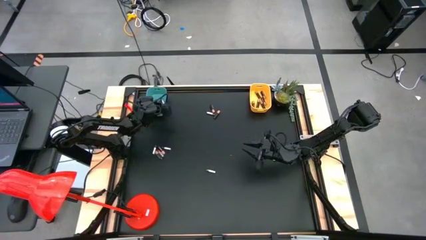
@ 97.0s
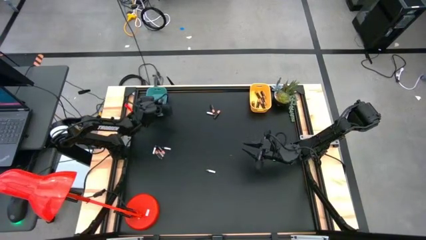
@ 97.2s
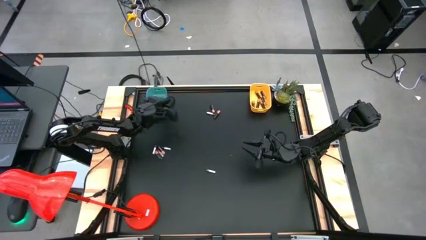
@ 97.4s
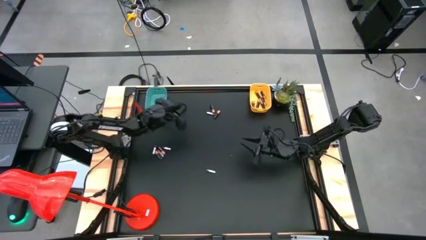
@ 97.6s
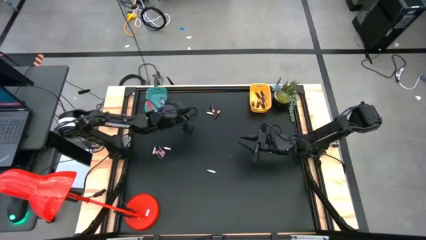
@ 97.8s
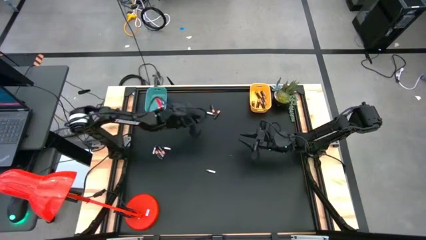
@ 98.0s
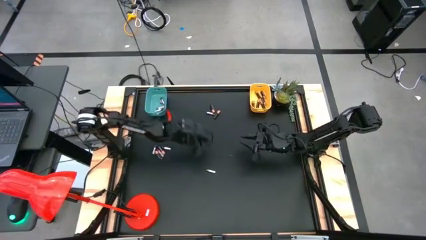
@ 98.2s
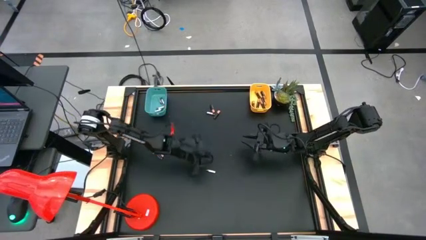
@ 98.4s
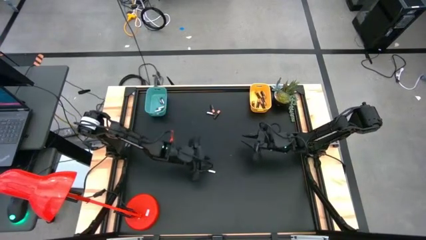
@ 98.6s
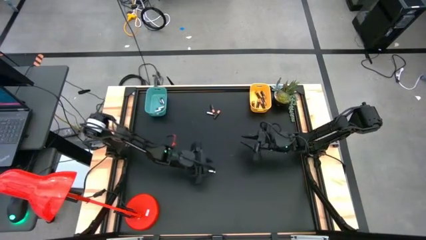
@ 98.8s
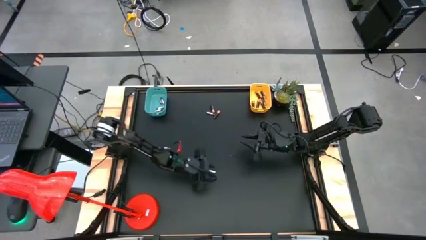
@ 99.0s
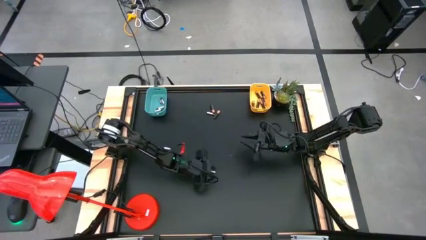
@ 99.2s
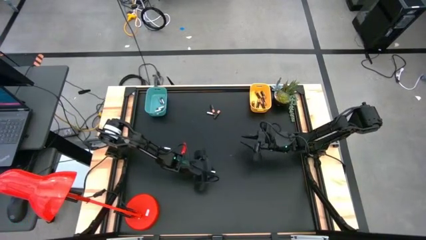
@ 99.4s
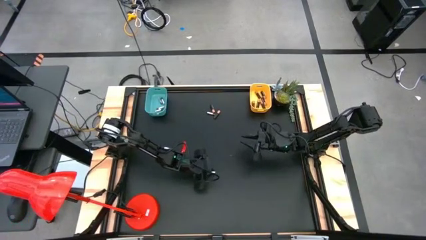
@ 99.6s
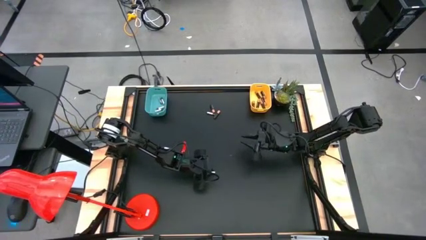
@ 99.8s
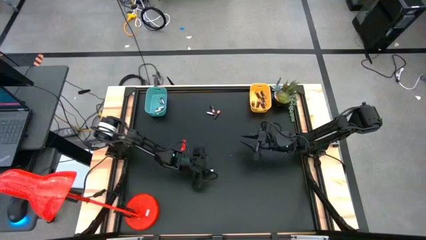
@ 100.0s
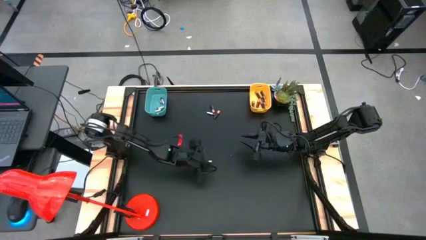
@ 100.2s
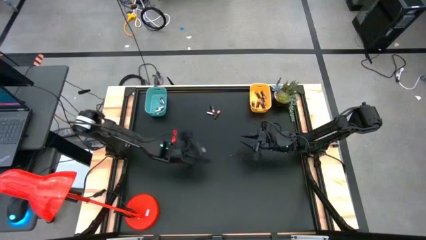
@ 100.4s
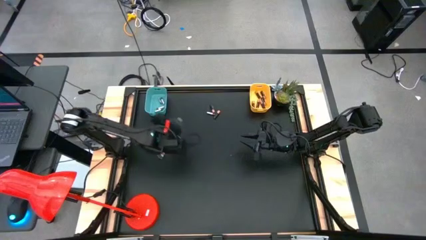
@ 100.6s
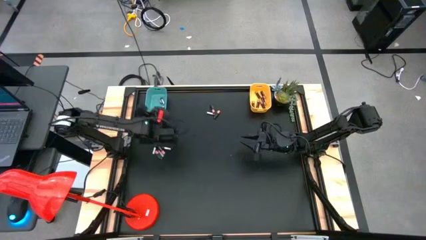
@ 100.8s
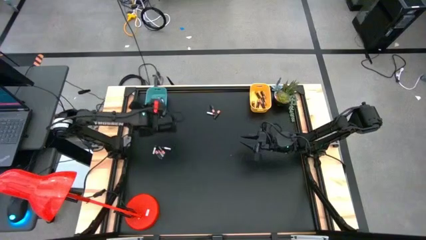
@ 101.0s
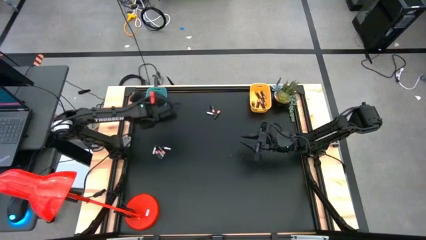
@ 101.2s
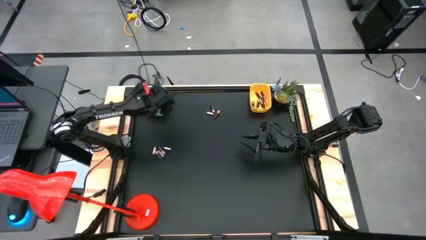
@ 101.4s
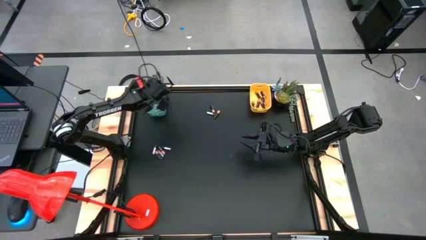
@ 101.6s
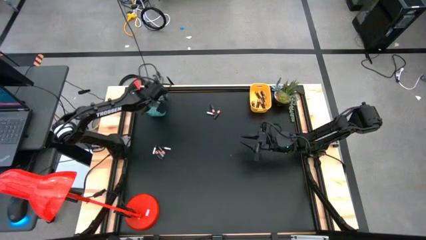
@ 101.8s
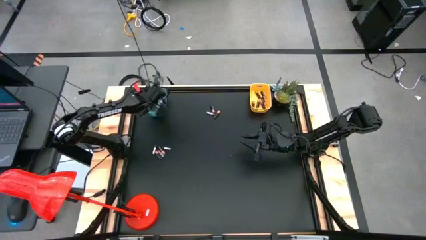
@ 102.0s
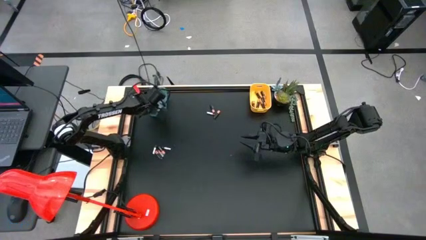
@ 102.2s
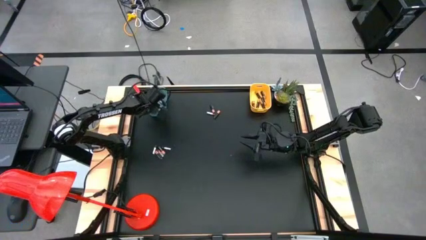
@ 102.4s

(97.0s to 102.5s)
Task: Sort batteries
Put the silver battery into the blue bin

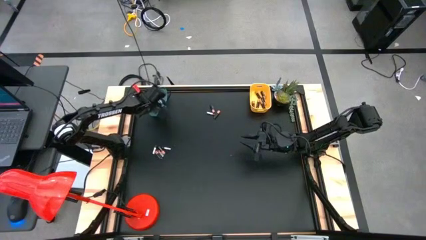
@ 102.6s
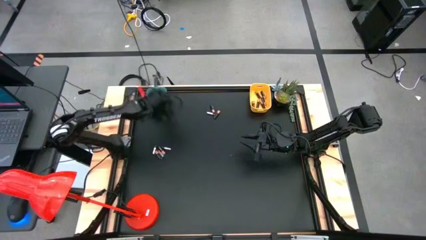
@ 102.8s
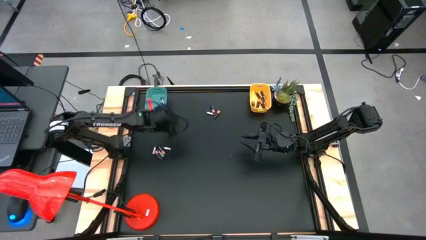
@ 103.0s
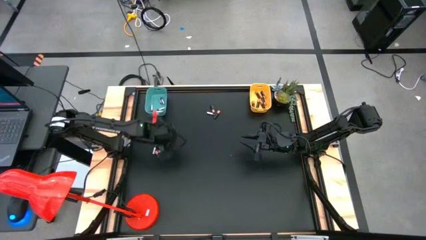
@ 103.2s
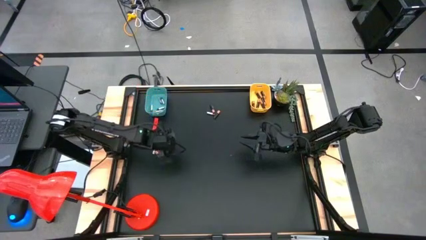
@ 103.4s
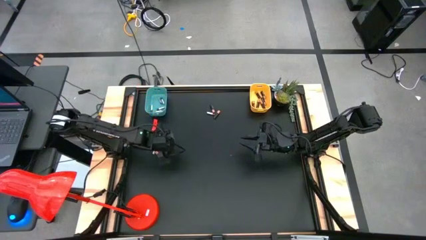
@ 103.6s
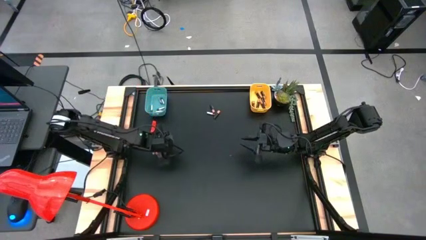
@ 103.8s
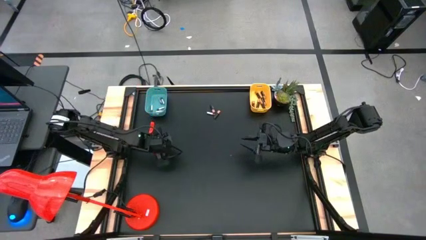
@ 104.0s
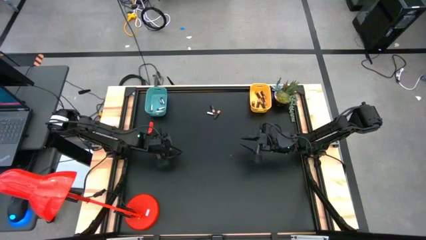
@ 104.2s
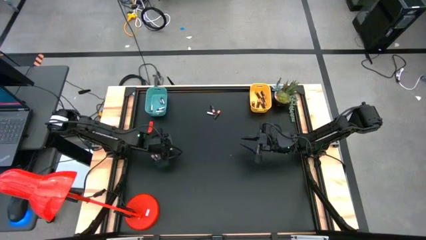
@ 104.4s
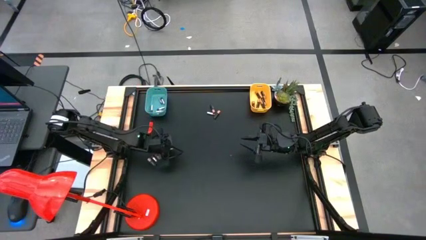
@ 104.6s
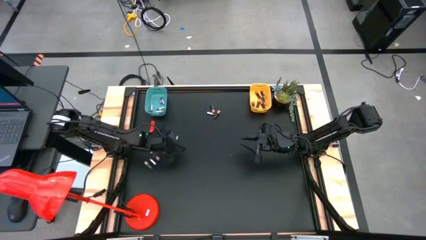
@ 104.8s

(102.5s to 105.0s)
Put the black battery into the yellow bin

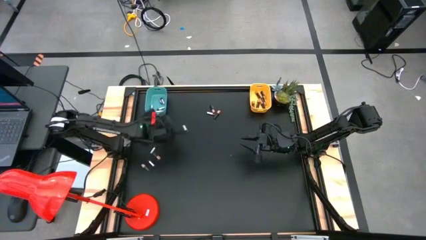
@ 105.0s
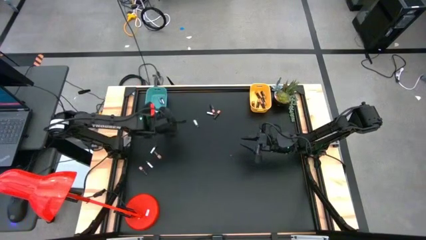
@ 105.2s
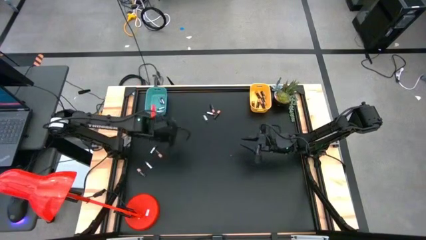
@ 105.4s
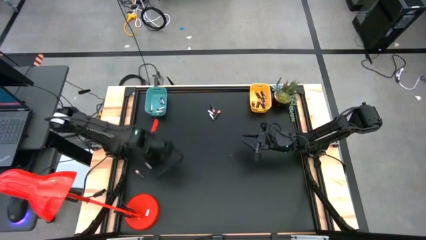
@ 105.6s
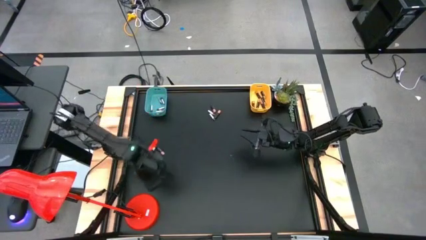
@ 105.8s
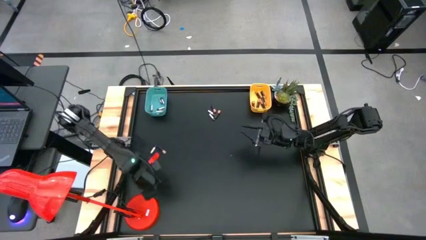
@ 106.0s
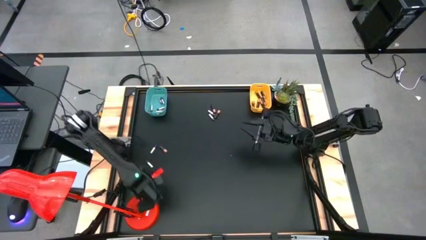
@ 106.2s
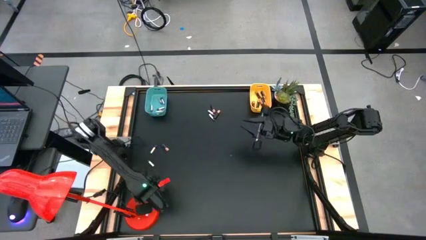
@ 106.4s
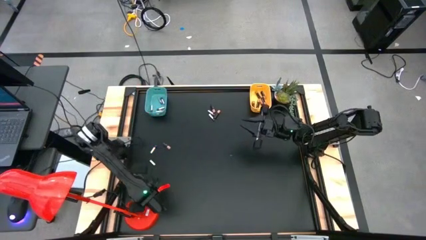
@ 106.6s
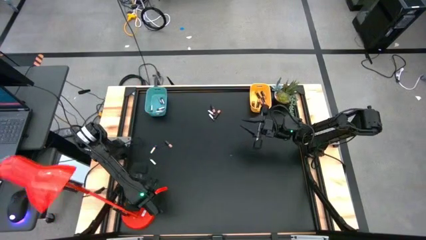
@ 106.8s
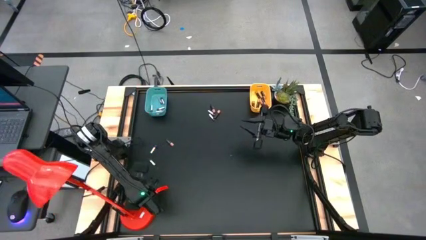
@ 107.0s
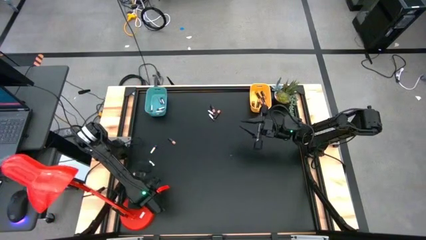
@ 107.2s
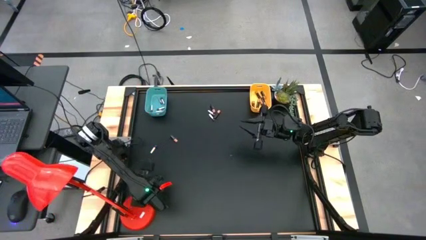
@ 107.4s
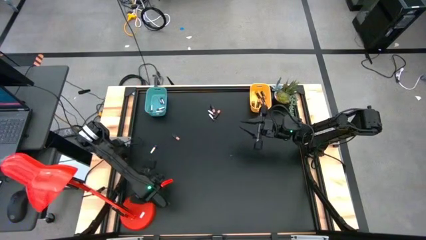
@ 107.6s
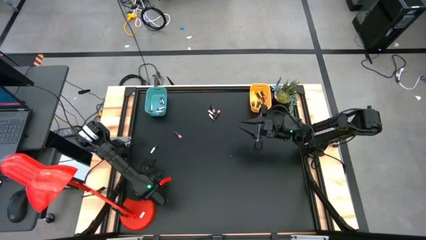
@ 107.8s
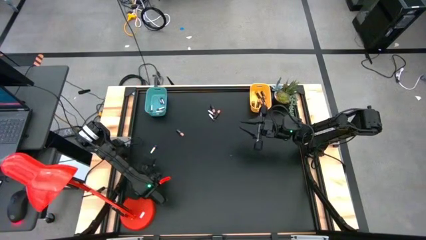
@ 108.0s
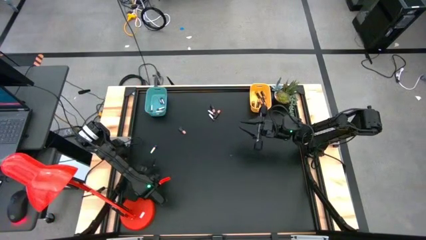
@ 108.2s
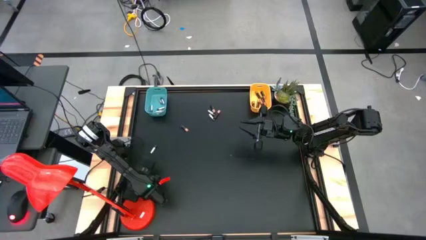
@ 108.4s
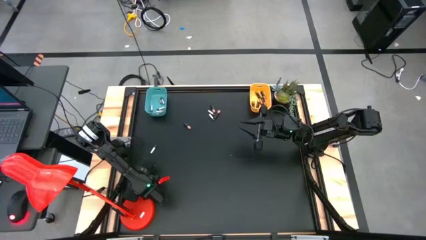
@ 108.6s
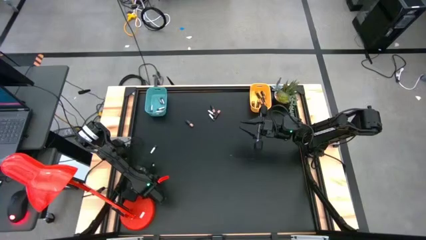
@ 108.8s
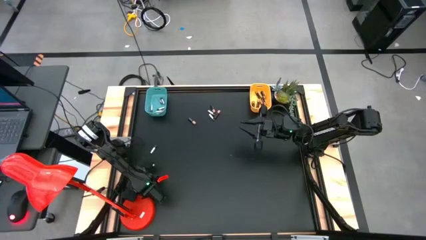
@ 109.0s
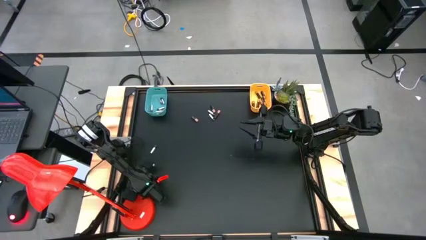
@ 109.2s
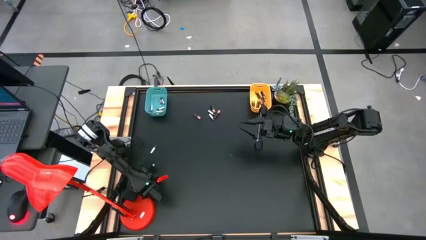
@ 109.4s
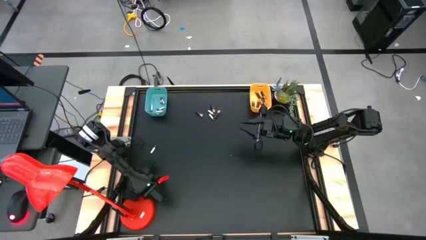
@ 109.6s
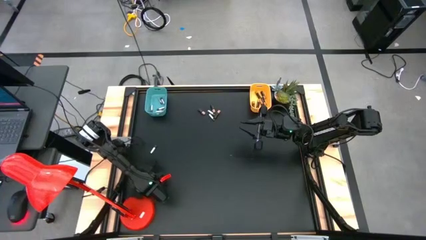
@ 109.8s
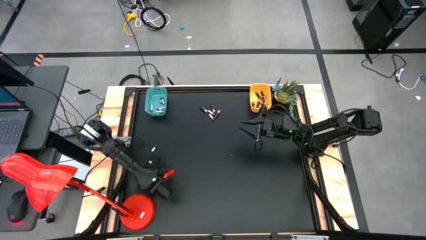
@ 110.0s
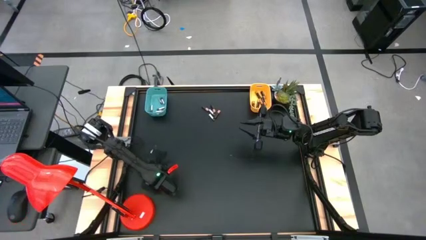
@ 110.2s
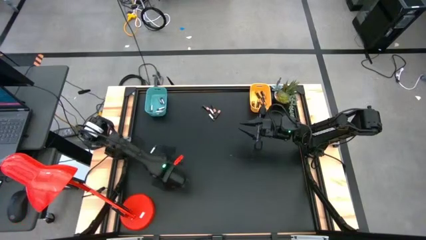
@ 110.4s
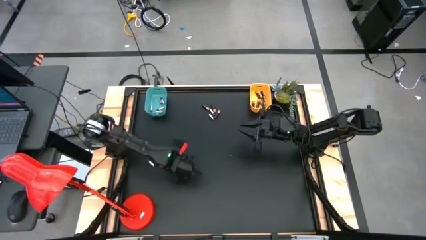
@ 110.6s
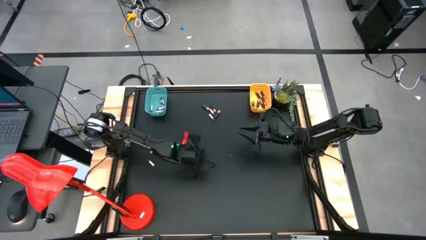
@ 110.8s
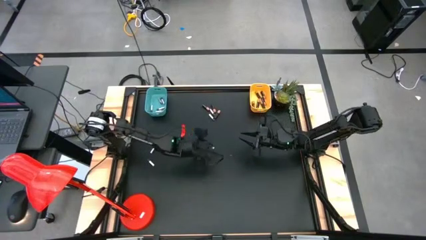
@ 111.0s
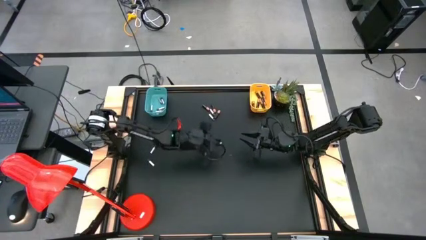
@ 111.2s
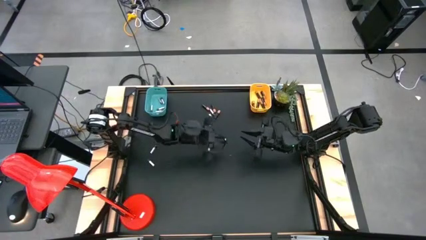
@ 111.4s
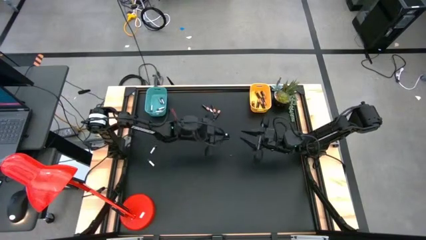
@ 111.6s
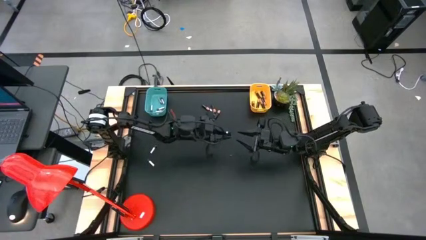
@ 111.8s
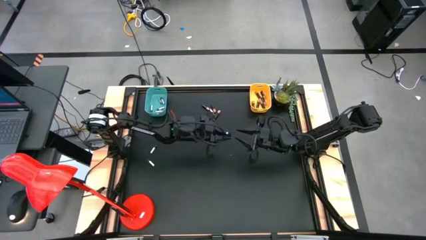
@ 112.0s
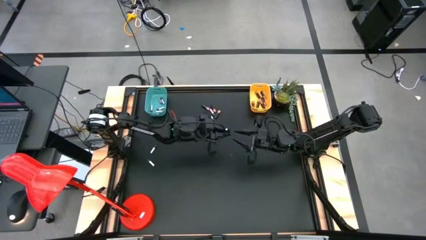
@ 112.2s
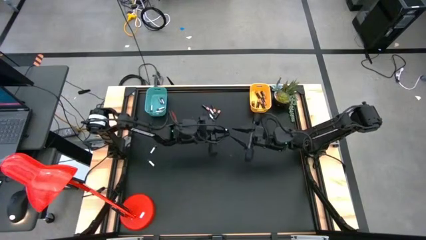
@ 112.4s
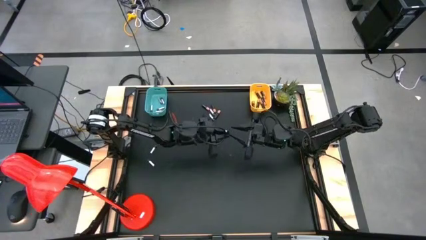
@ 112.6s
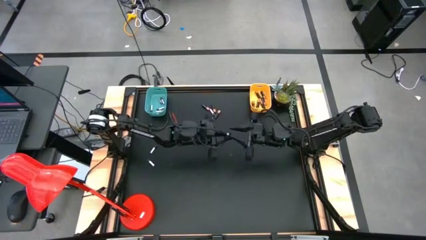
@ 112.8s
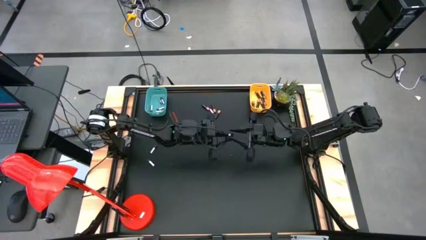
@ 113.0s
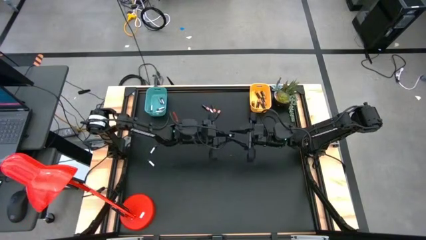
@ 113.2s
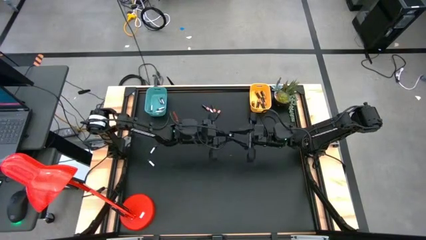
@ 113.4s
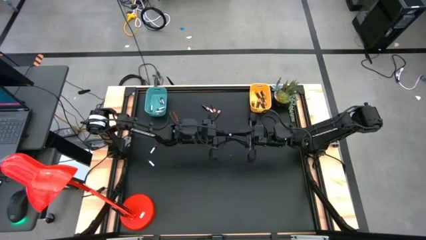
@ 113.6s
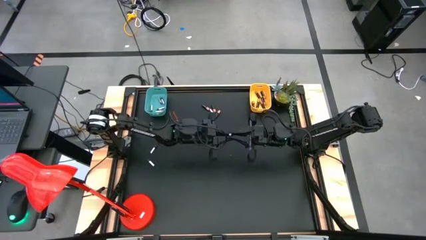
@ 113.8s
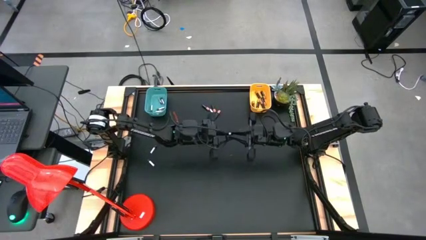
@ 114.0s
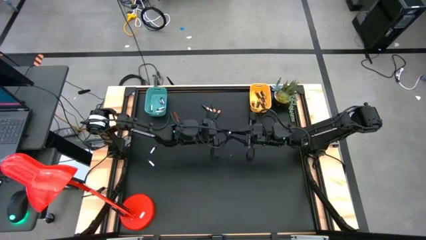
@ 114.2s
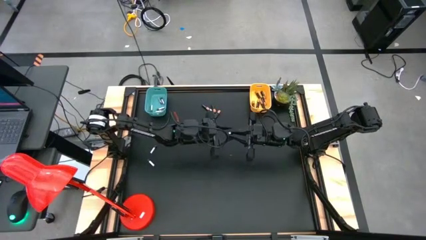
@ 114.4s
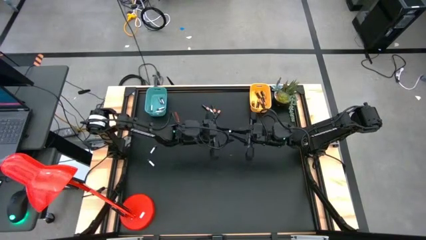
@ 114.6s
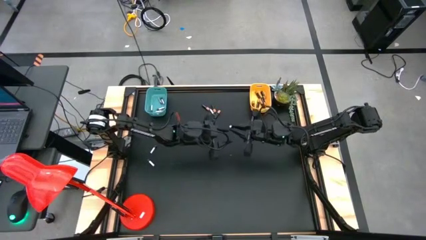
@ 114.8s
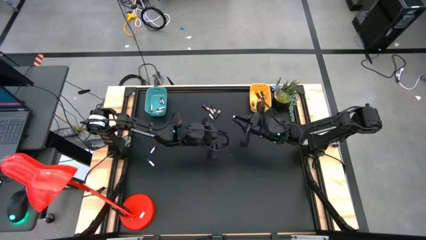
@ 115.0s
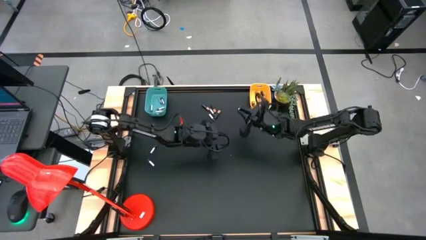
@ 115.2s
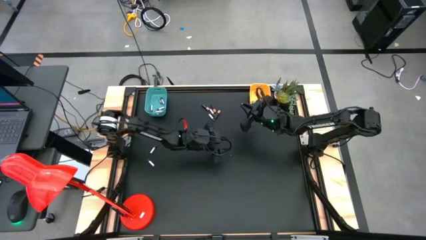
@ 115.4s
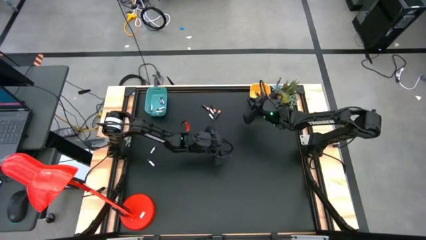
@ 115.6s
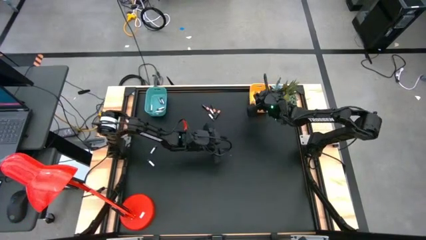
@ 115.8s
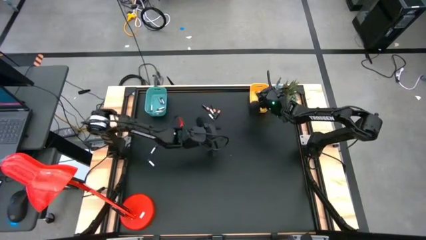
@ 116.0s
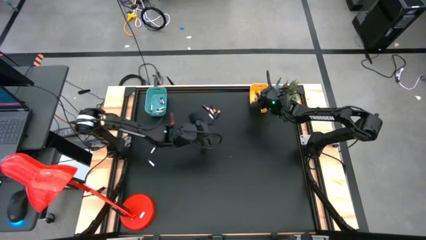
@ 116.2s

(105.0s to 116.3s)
Put the black battery into the yellow bin
